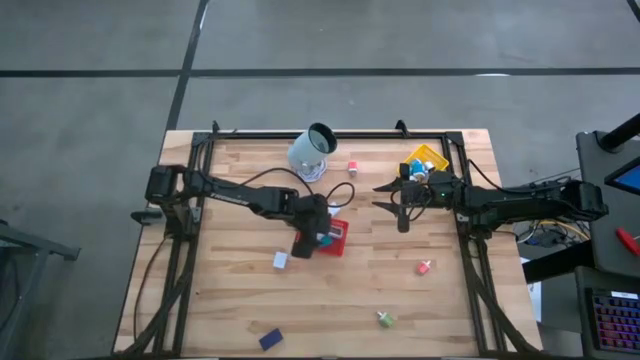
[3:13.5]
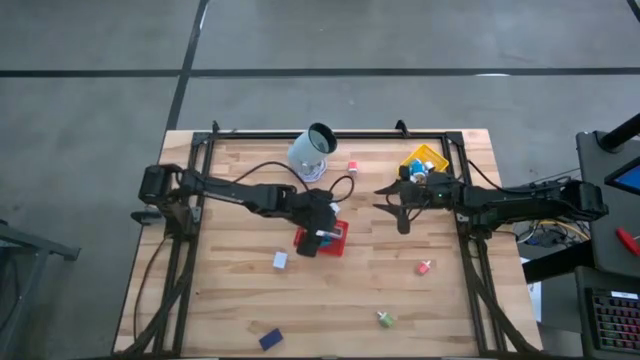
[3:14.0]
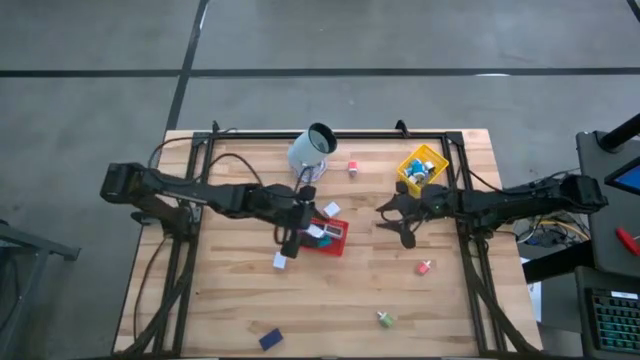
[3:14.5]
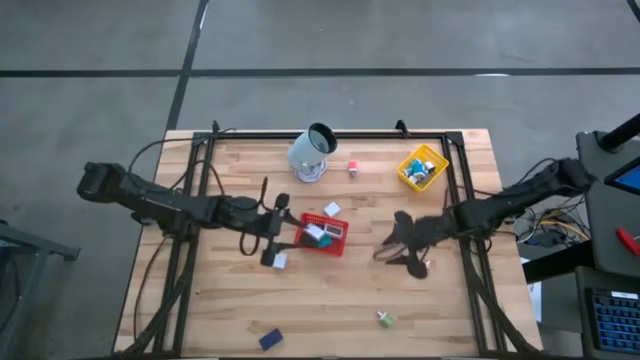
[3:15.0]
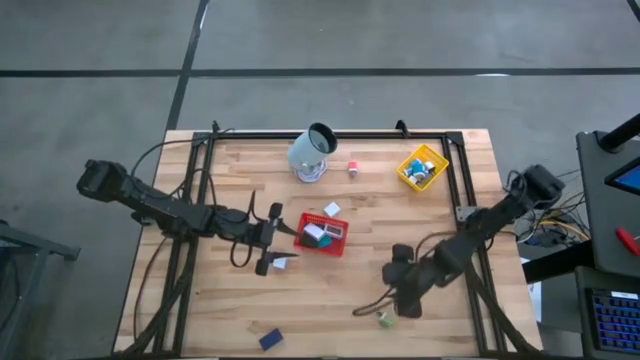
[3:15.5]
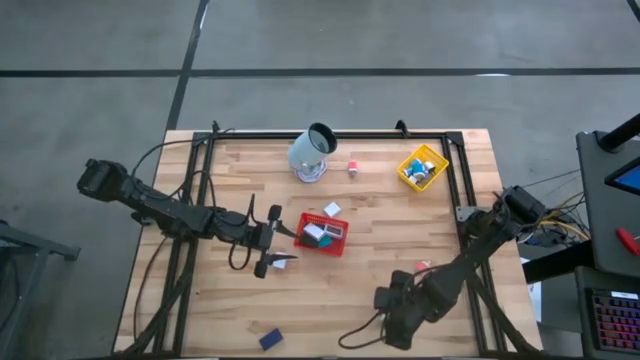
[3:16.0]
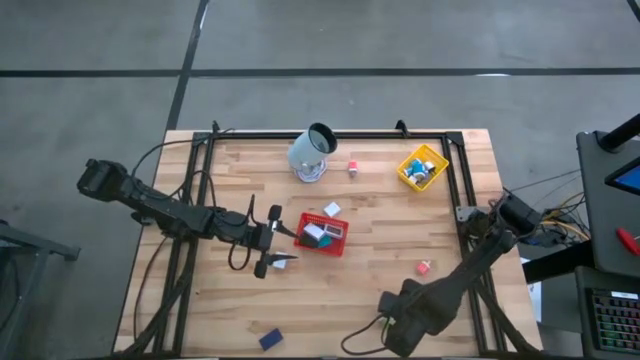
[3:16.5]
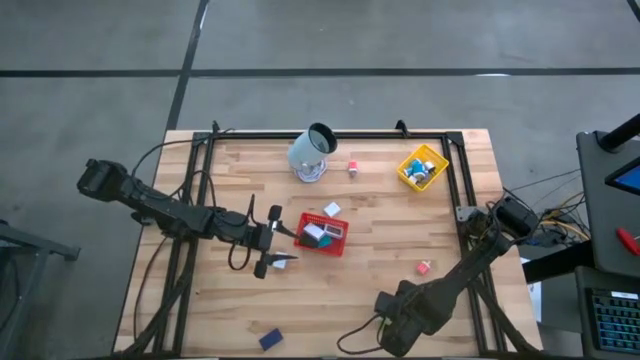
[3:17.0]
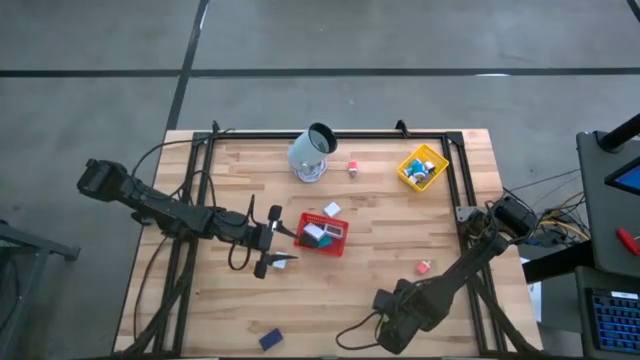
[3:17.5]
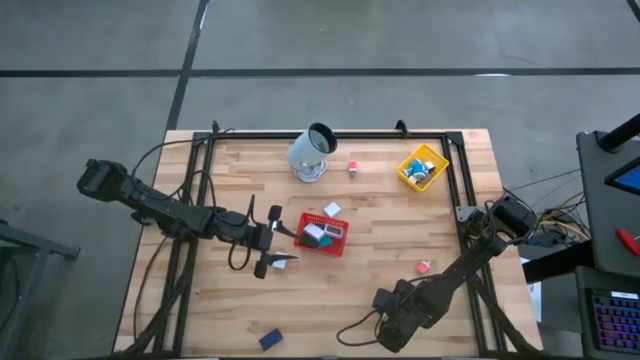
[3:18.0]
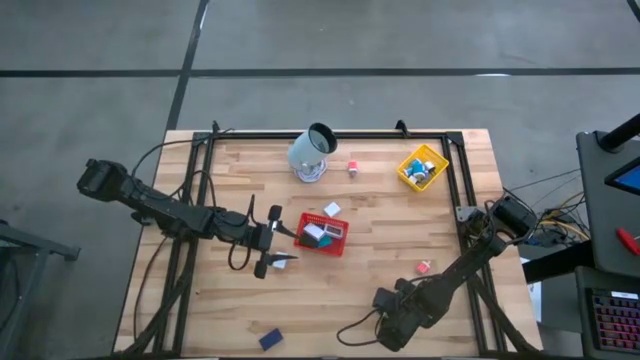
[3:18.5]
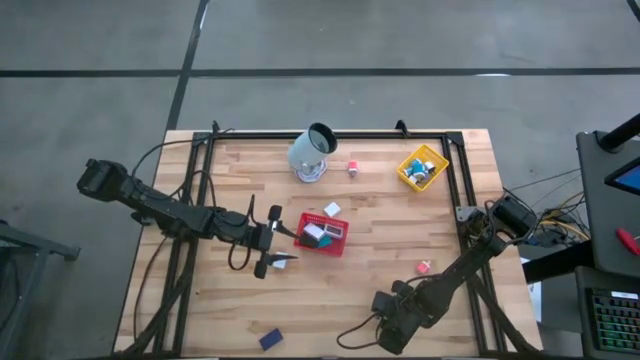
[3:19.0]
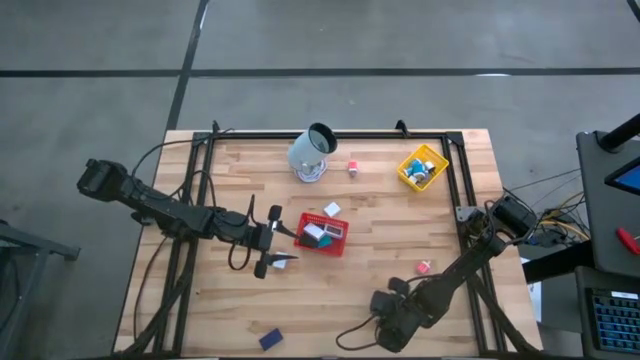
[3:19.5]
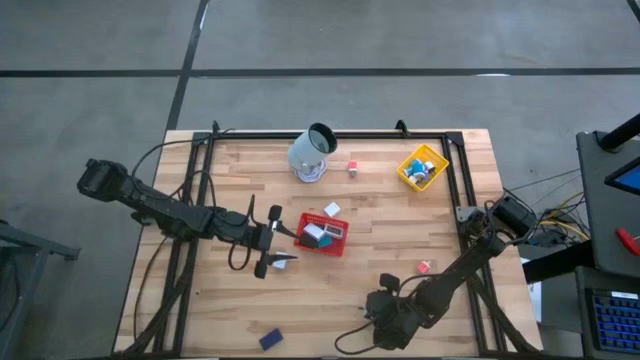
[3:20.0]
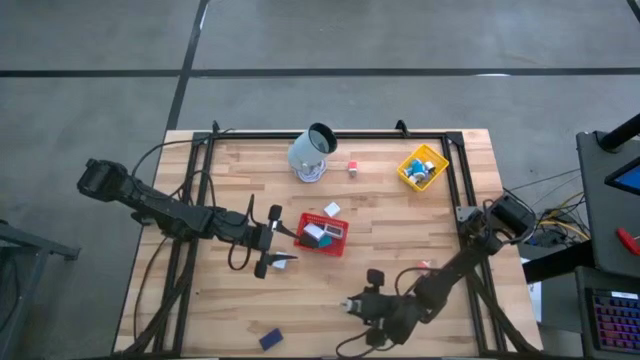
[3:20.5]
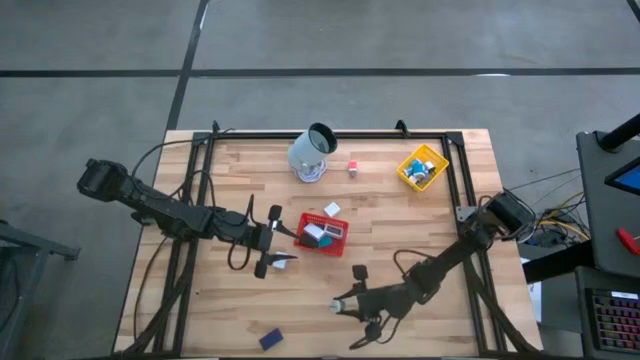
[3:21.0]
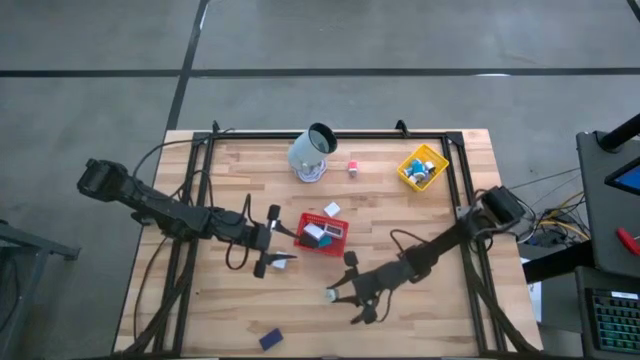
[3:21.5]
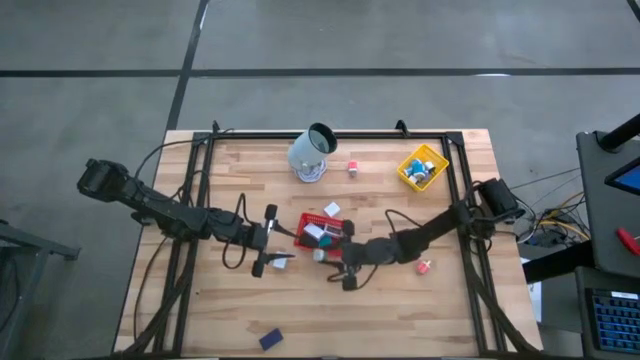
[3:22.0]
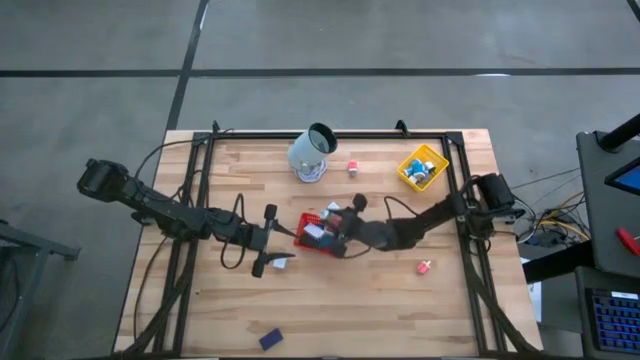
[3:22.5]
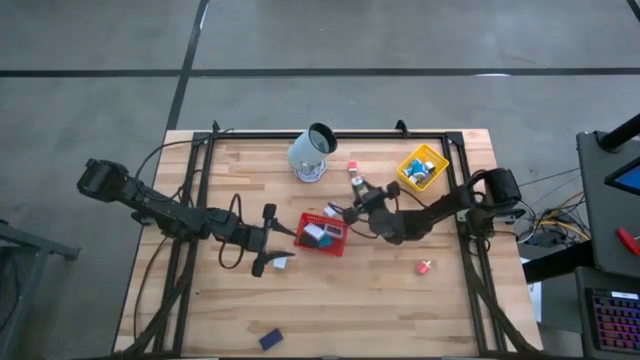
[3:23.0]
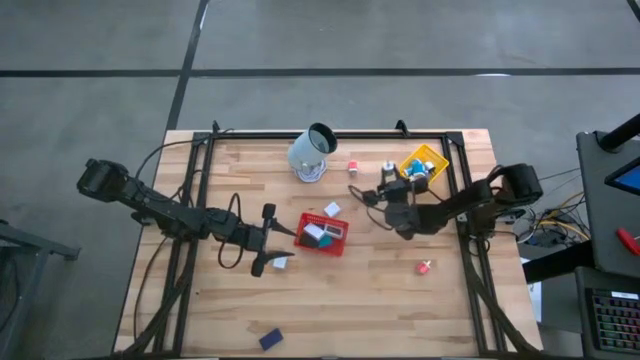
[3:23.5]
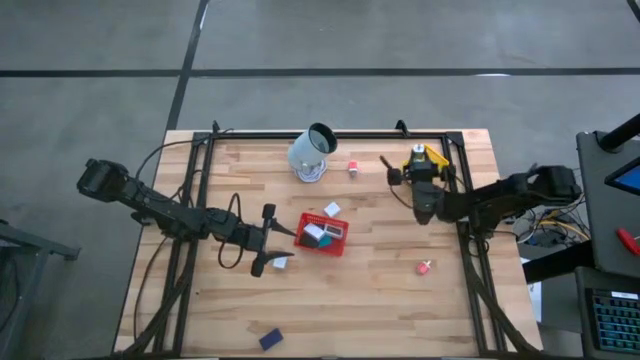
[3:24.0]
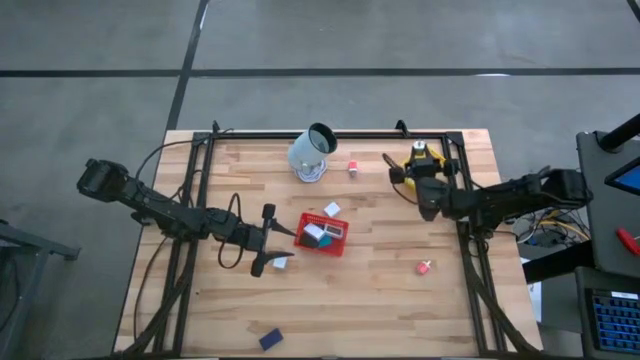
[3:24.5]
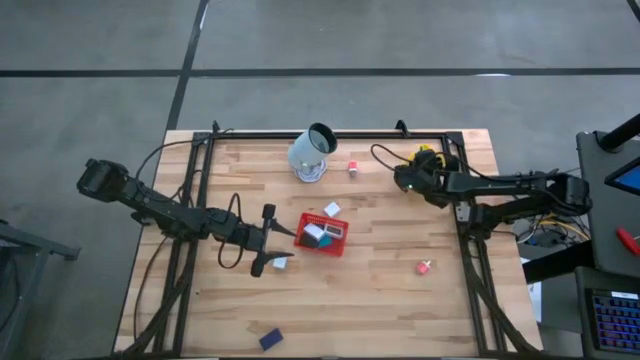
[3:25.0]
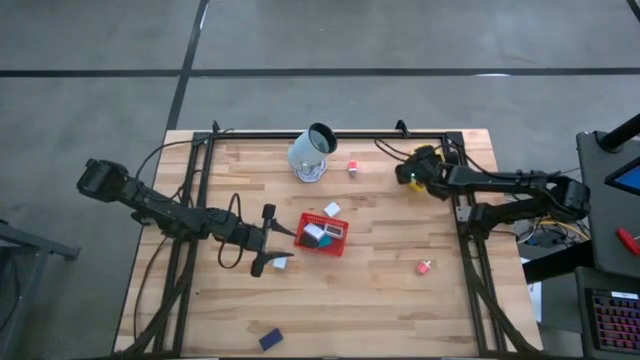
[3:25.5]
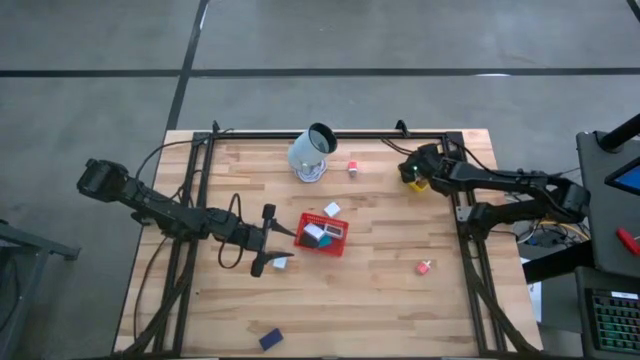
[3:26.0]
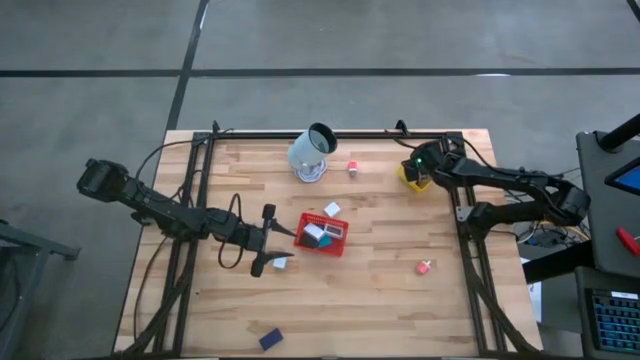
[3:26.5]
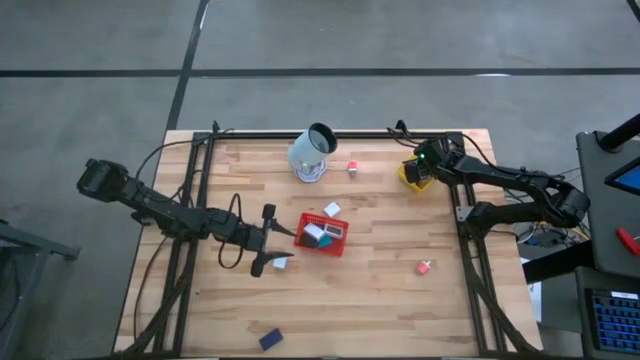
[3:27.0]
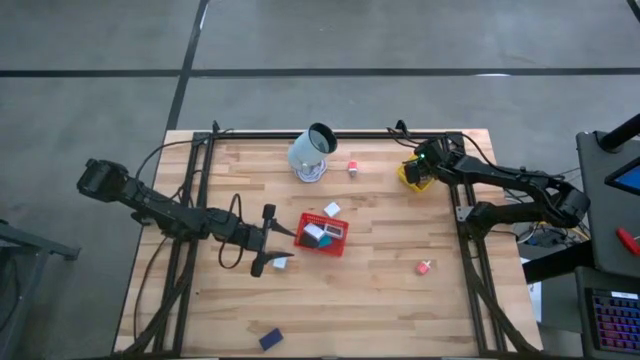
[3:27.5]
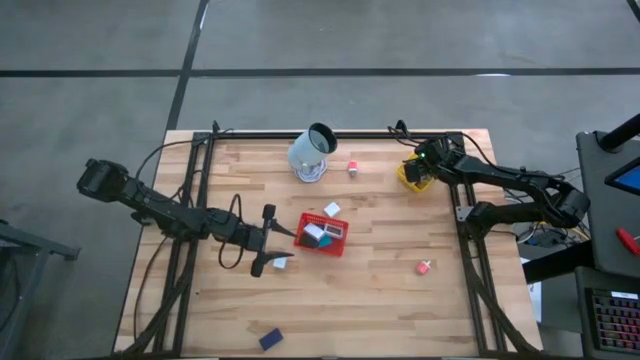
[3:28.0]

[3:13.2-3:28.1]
Task: Pick & Place Office items
Put the green charger adapter into the yellow basket

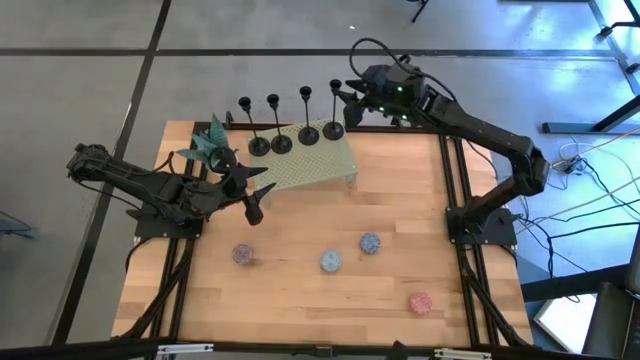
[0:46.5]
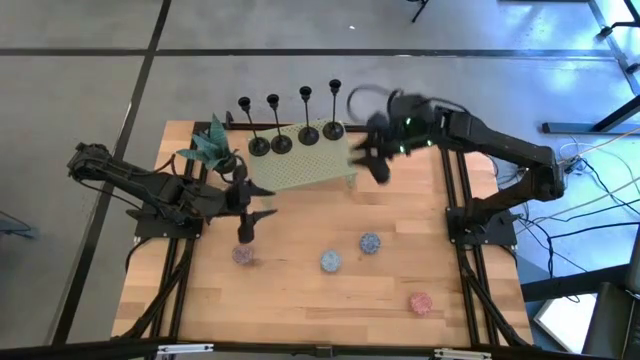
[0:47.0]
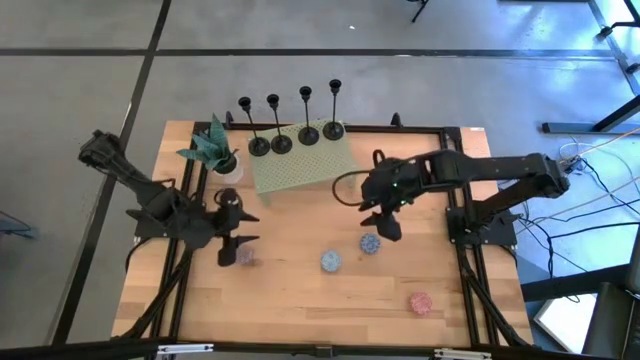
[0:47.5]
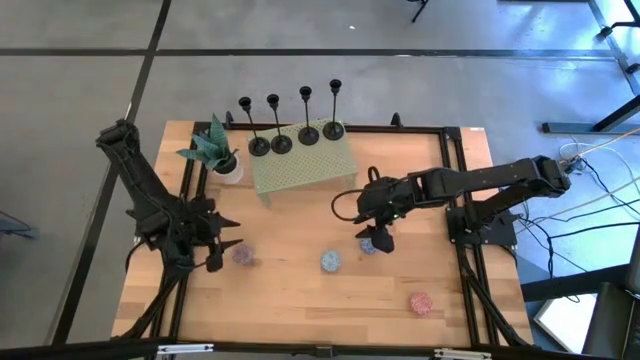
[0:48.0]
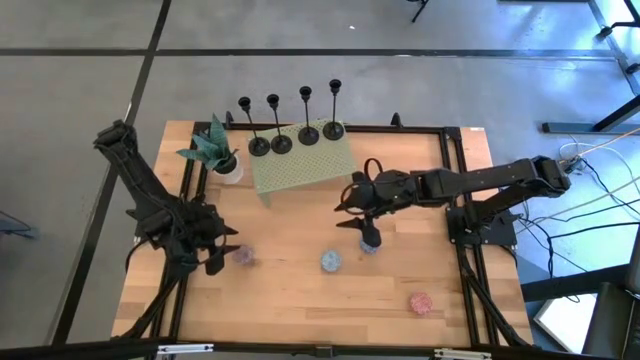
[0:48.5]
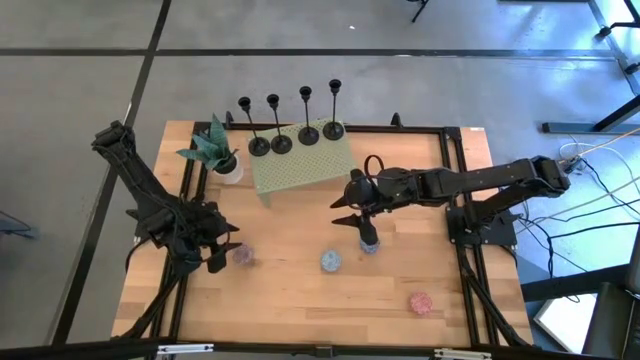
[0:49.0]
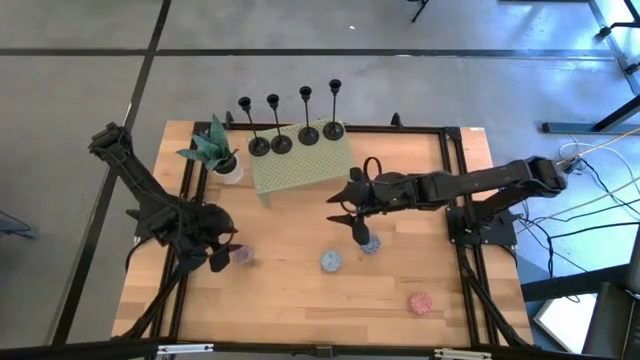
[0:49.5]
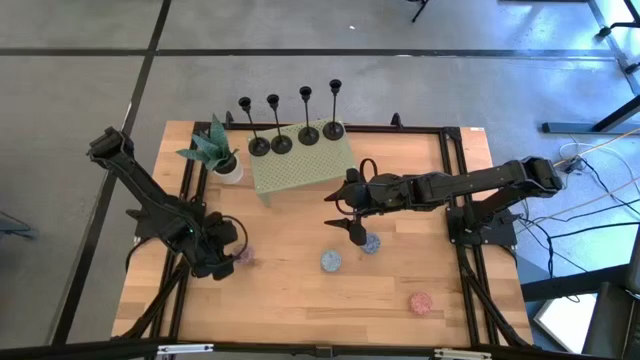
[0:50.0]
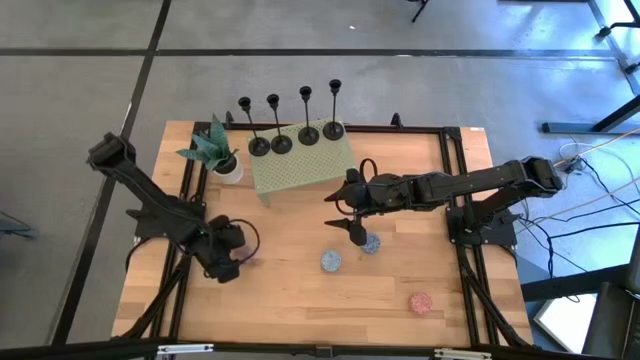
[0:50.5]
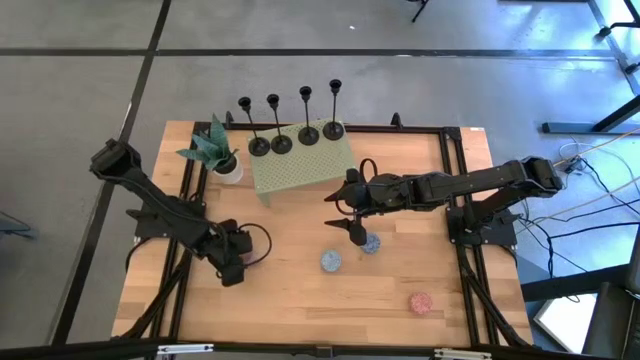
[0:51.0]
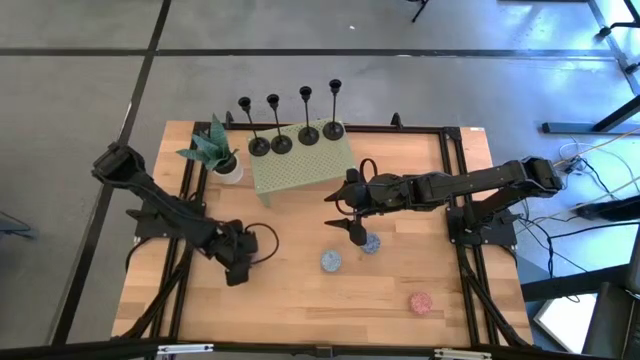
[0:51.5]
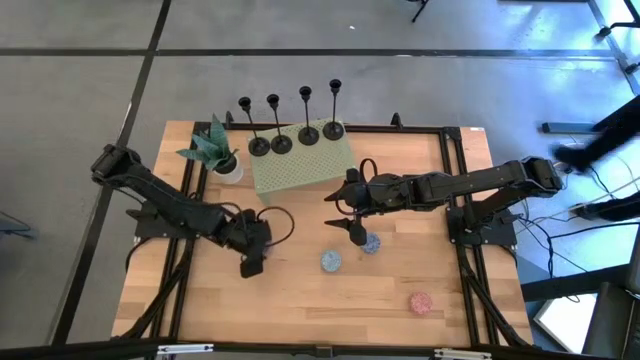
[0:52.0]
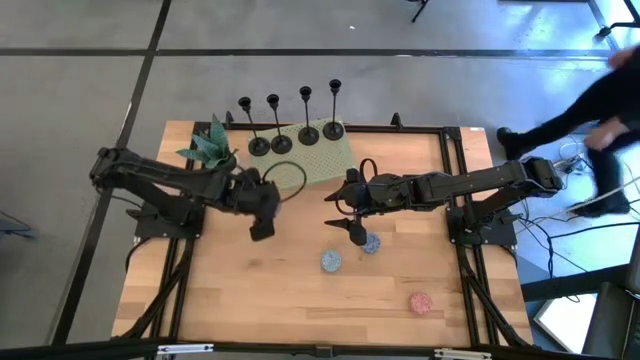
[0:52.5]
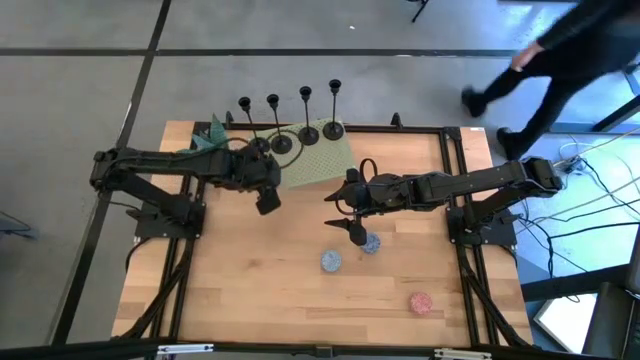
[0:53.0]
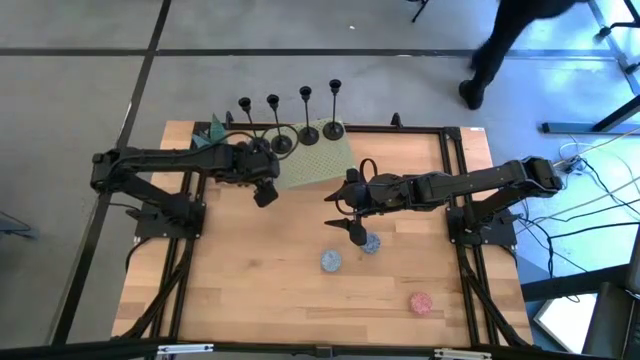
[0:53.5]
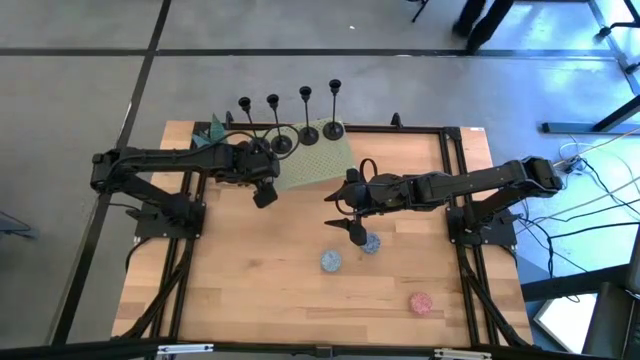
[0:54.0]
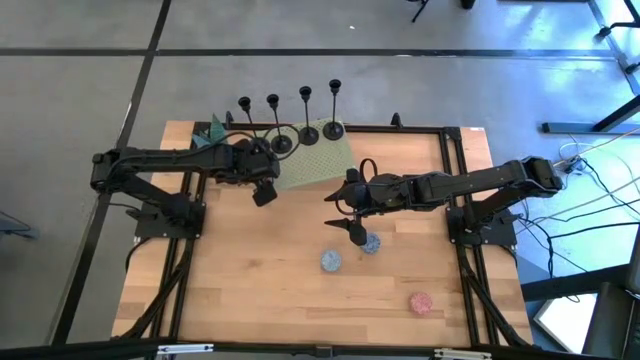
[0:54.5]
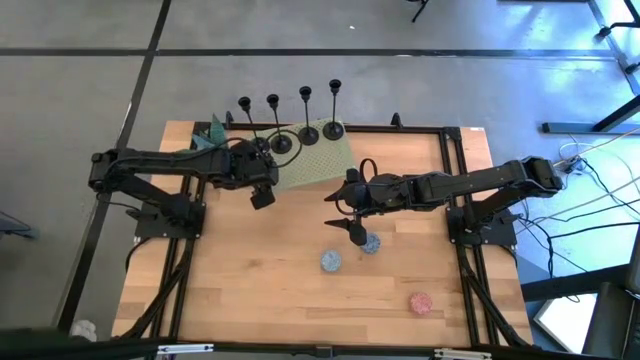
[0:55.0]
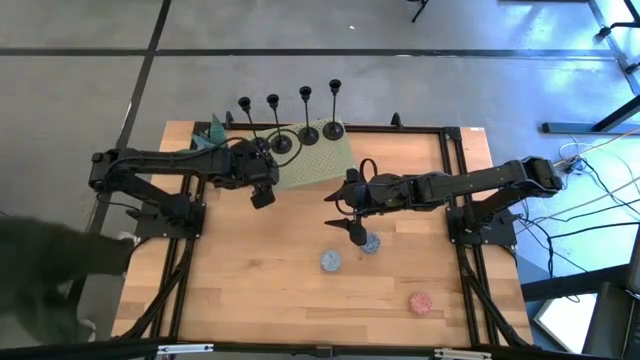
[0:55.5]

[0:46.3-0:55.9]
Task: Pick & Place candle stick holders
Put the brown scented candle on the shelf
